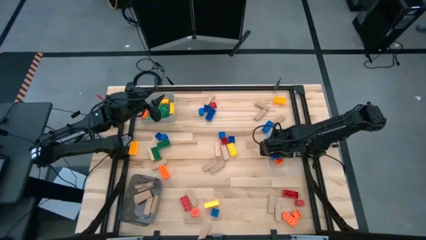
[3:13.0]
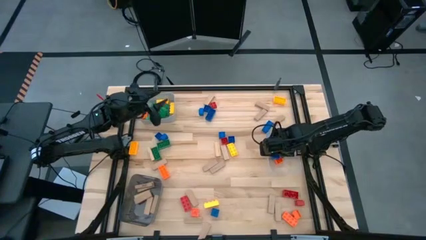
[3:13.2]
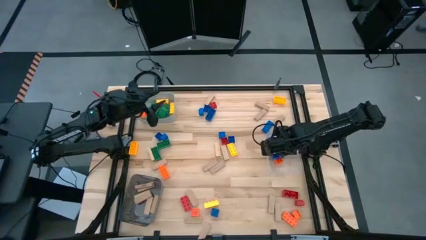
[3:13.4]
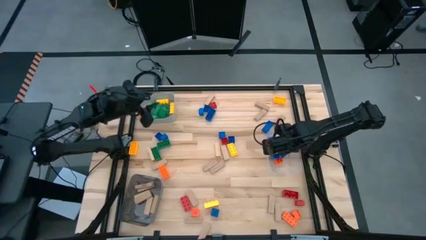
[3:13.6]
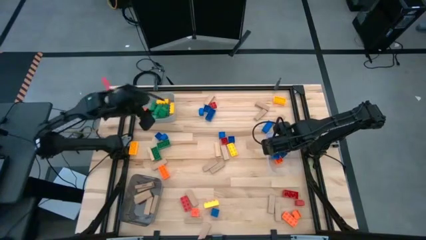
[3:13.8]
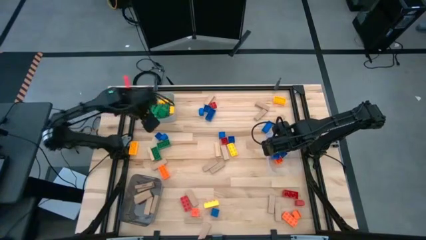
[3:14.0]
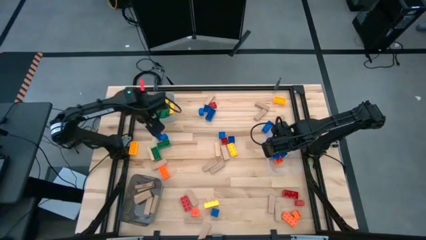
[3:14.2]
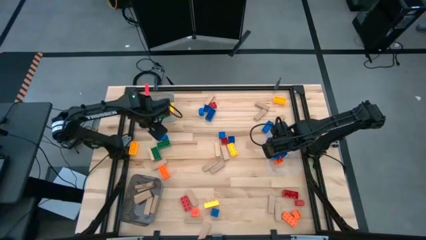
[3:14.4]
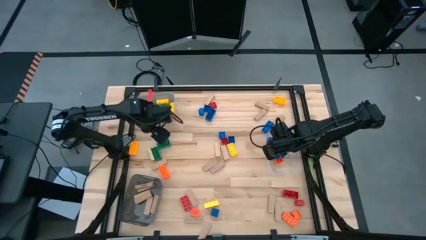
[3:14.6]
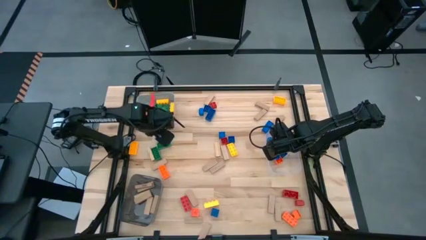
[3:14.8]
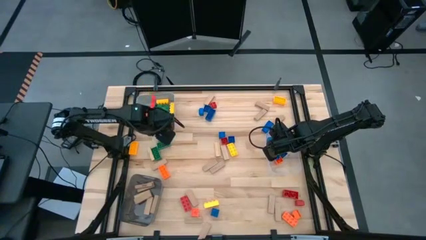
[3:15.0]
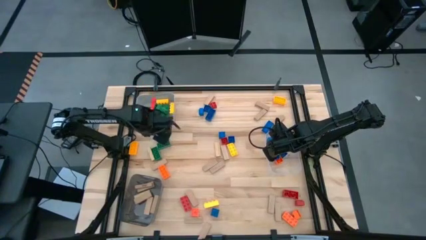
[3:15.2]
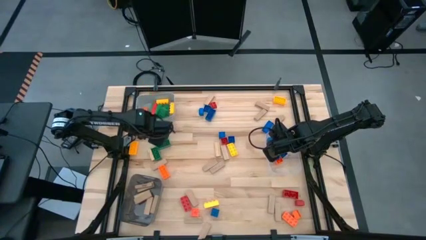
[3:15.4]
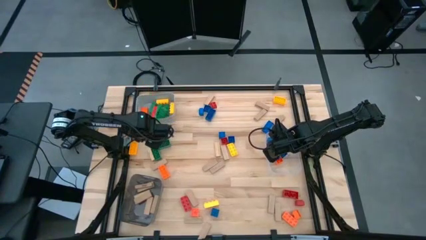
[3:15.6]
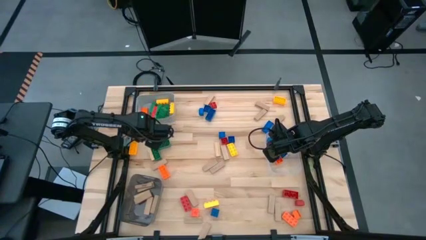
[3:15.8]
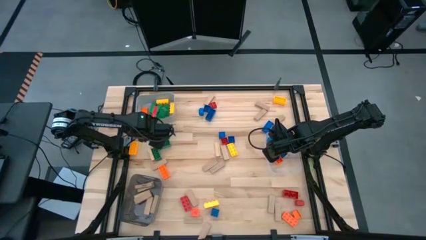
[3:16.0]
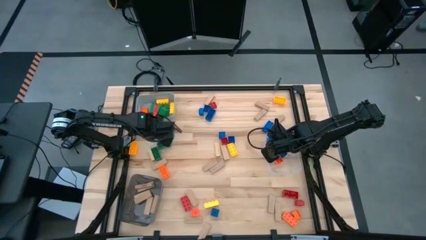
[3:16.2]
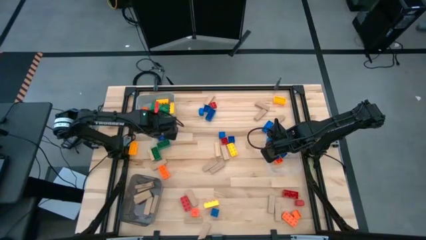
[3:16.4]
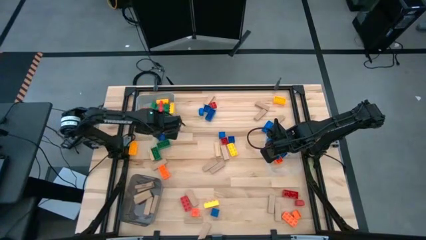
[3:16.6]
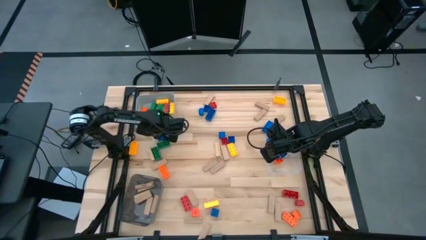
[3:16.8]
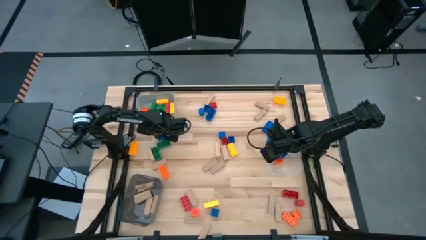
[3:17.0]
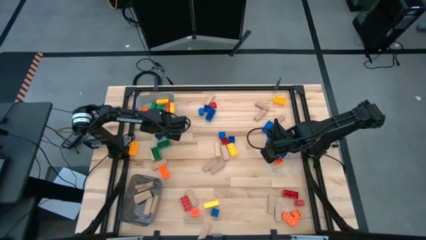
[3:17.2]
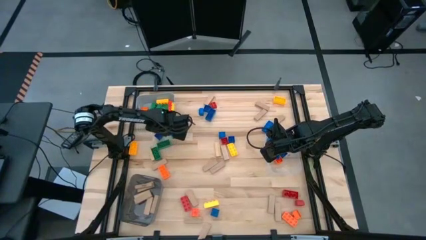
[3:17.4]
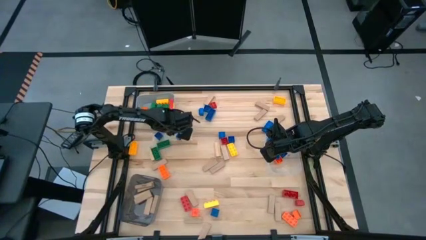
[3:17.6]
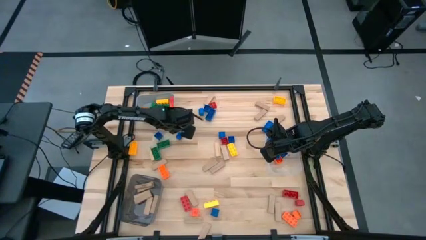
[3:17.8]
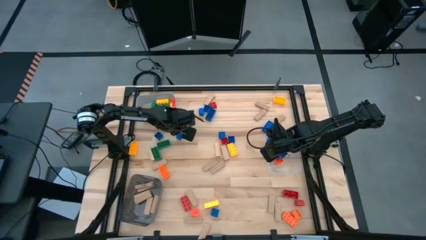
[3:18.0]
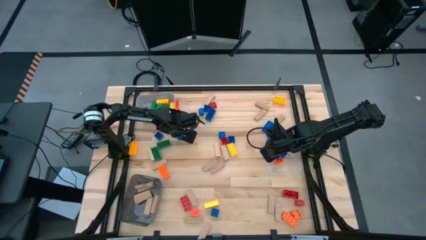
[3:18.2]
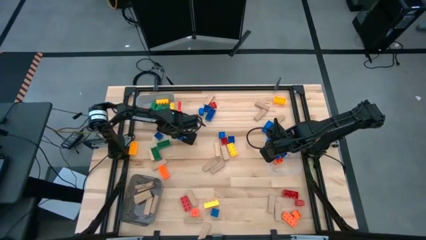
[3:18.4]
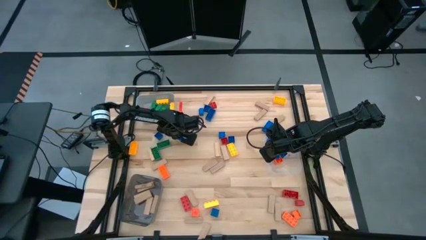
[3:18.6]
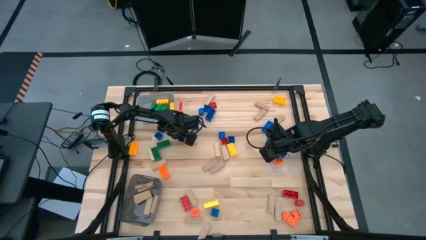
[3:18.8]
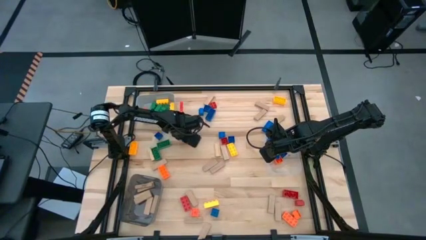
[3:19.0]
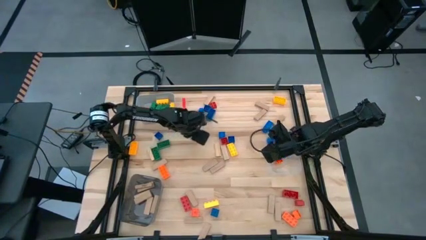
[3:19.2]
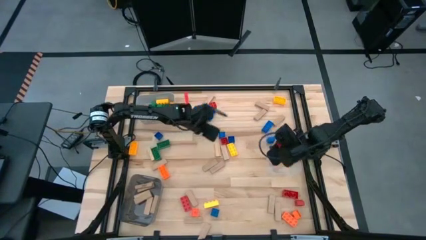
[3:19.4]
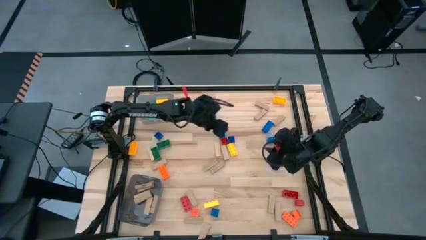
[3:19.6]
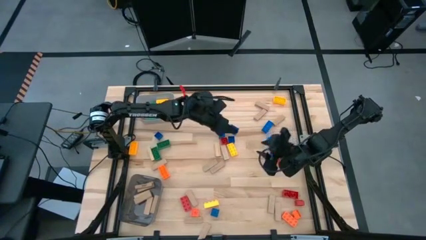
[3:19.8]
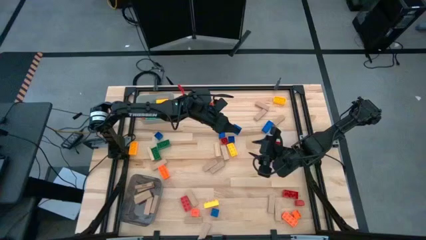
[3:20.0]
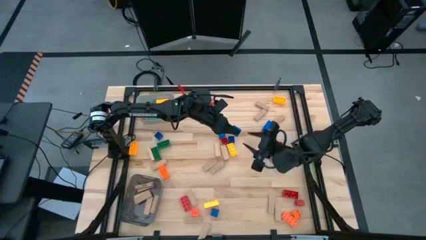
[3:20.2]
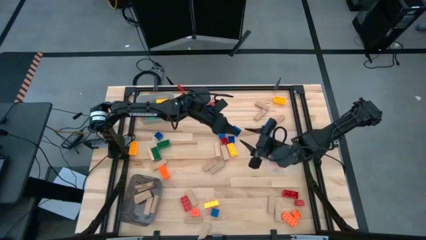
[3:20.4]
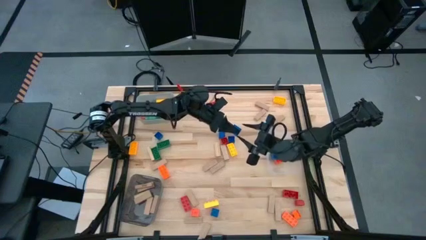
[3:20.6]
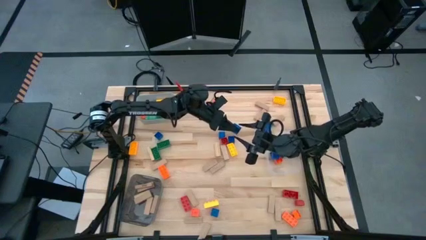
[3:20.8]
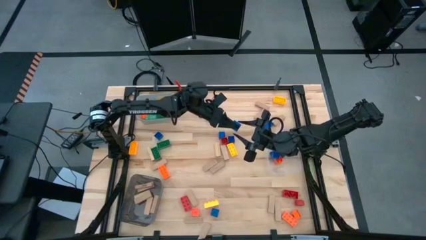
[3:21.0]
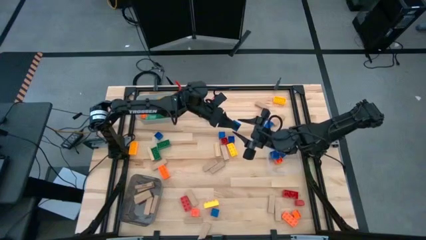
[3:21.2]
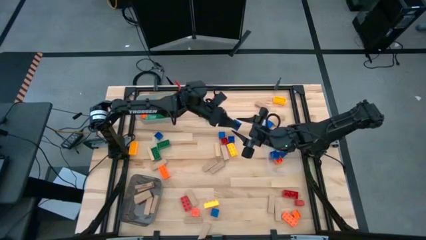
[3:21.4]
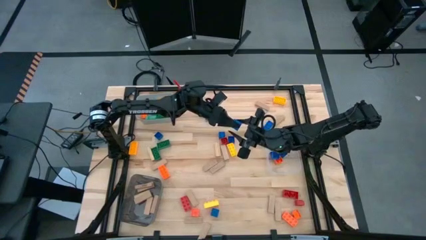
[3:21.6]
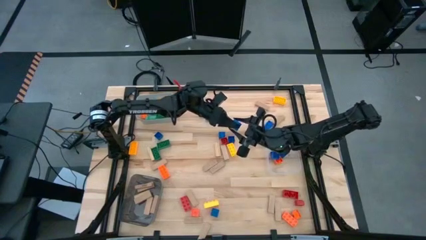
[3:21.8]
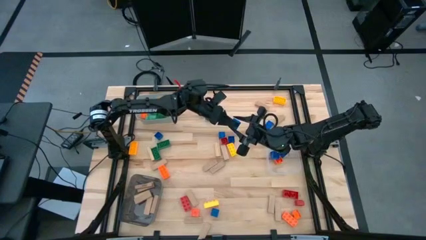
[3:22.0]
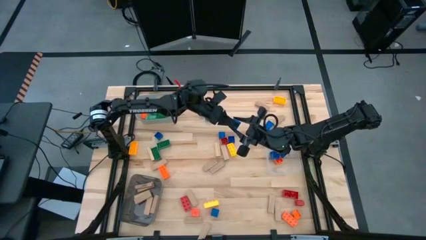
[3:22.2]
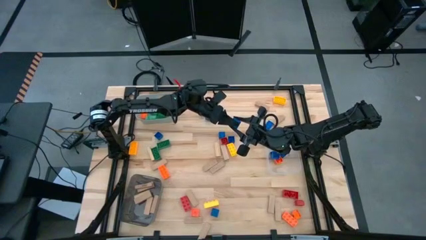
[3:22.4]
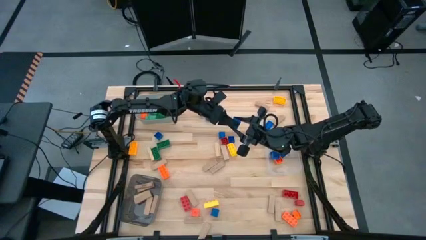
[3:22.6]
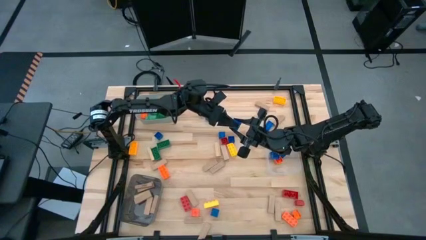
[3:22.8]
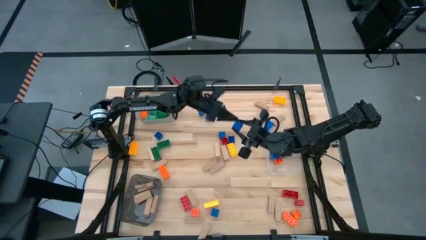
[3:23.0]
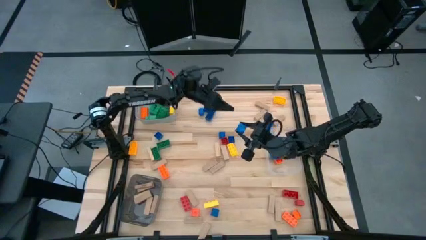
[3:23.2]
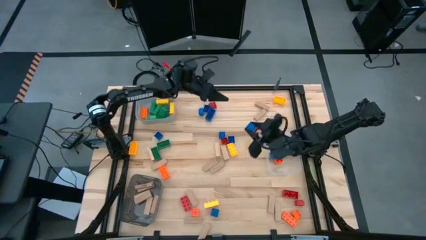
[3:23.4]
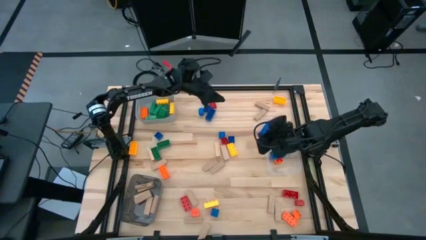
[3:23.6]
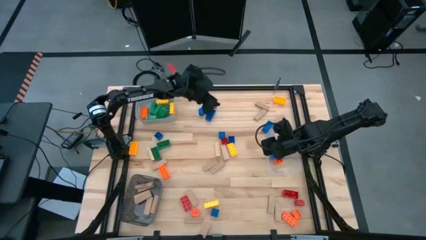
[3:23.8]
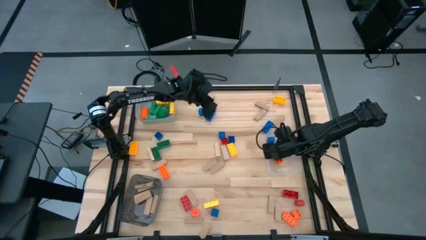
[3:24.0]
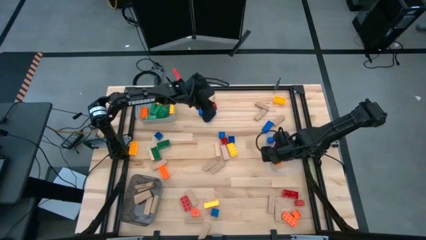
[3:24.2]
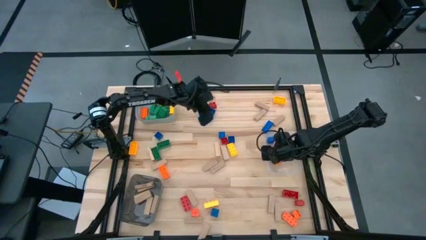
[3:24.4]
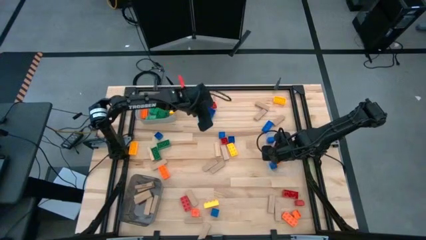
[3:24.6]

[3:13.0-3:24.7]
Task: Sort blocks by size
Put the small blue game piece into the transparent bin

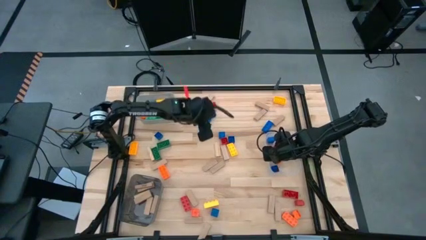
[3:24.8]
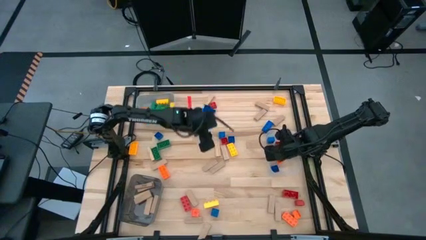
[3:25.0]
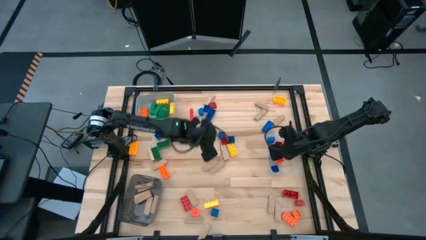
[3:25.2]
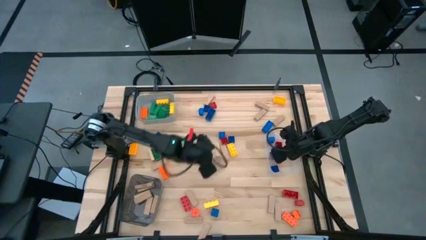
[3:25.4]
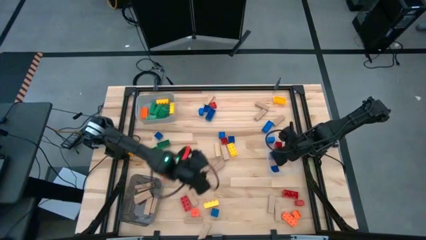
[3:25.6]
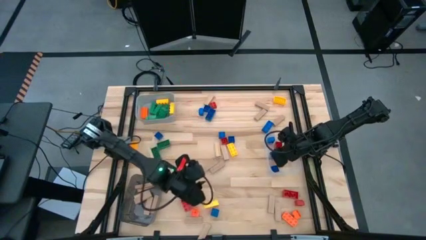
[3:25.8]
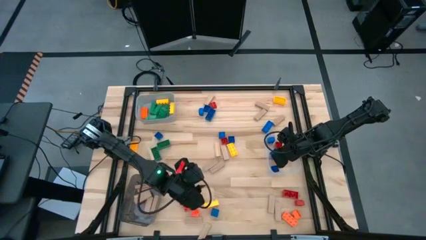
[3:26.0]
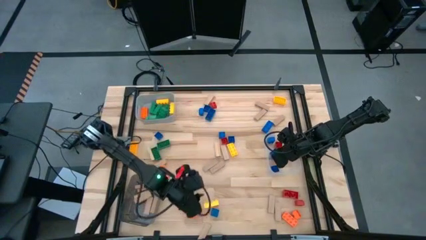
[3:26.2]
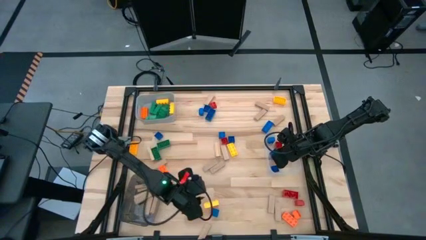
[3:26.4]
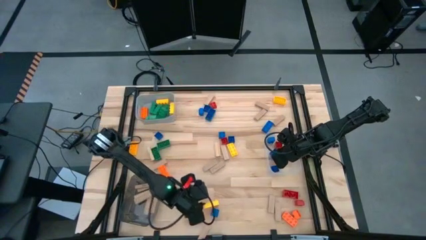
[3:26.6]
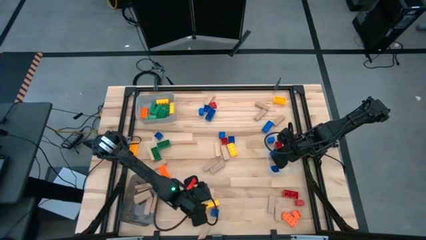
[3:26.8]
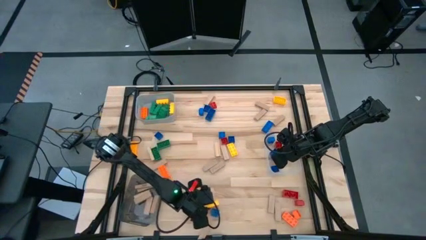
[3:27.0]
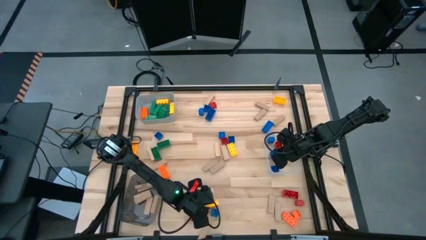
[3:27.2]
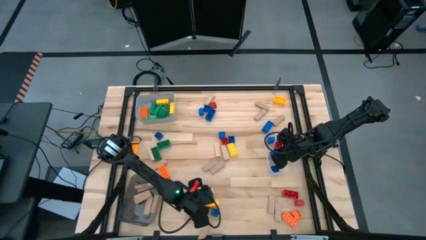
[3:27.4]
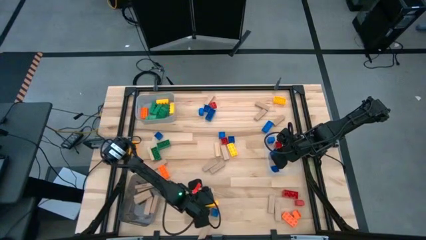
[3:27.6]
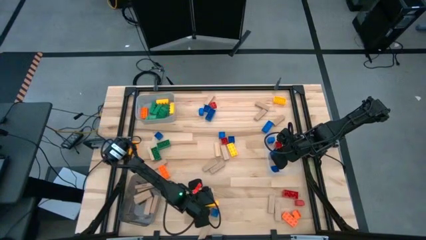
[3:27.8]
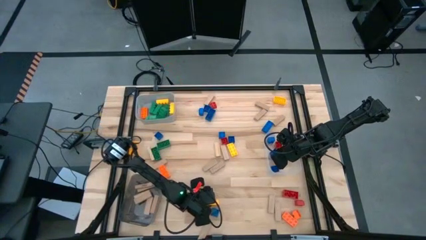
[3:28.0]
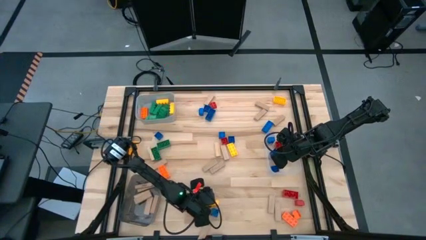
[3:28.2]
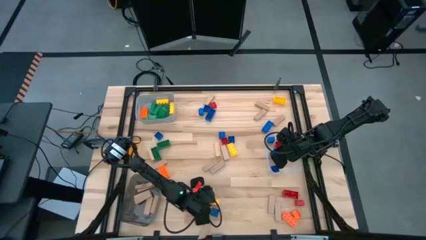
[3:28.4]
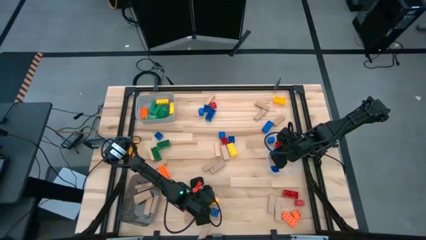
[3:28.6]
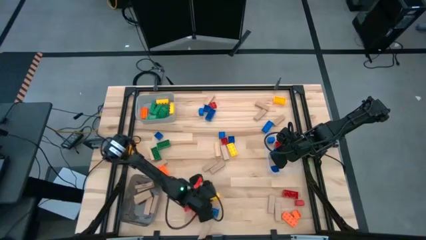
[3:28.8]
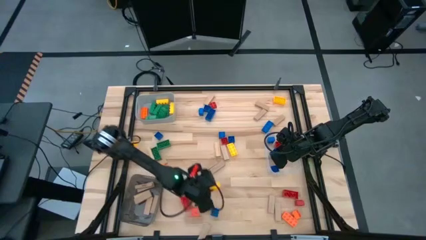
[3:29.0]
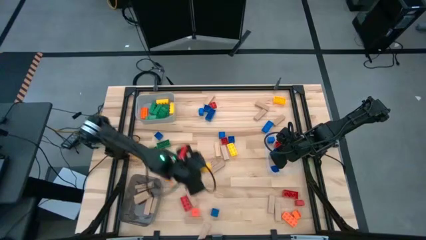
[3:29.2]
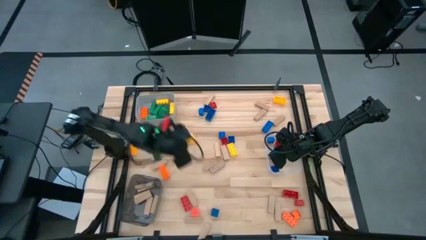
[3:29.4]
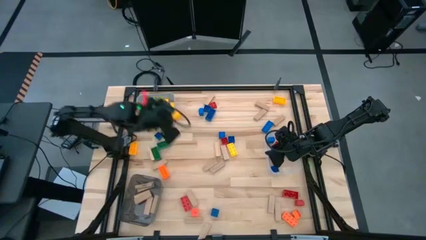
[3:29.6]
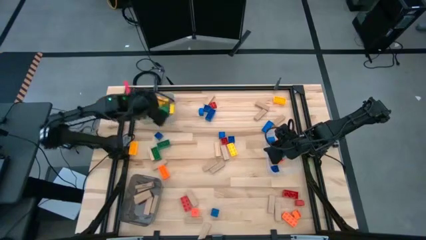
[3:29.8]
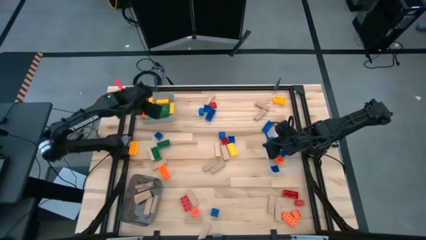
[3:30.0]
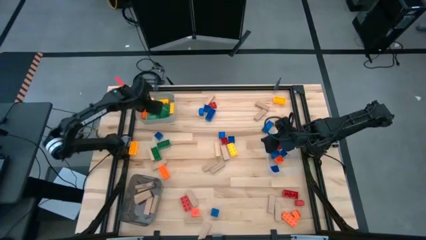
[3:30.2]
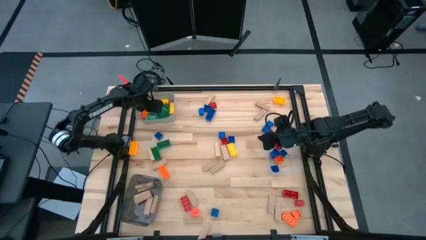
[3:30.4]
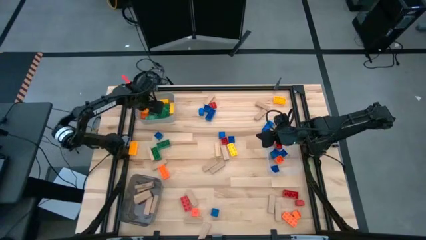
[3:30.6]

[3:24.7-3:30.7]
Put the large yellow game piece into the gray bin
